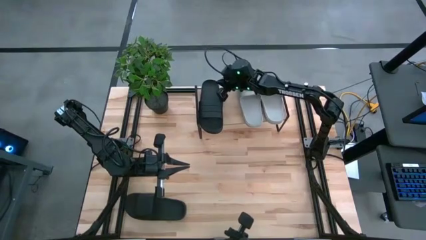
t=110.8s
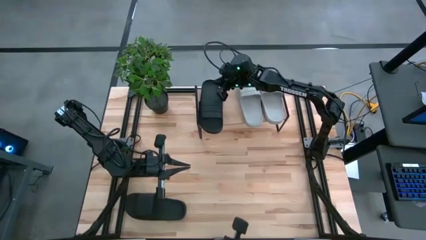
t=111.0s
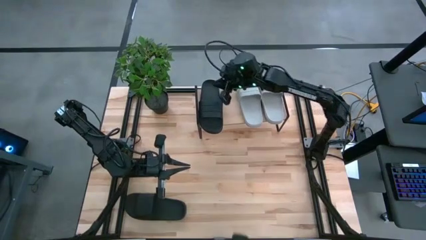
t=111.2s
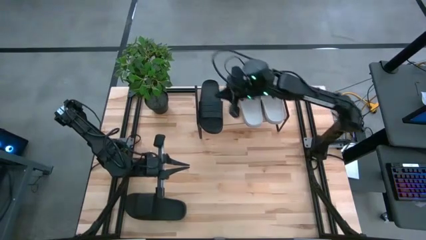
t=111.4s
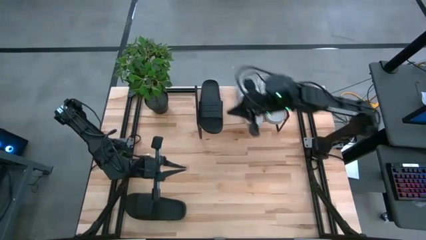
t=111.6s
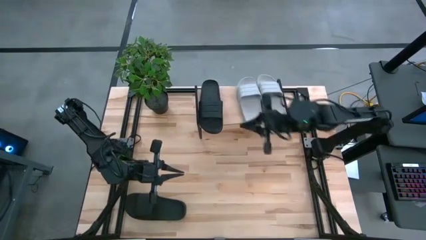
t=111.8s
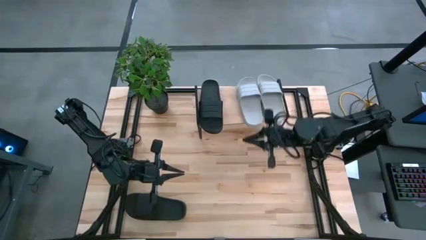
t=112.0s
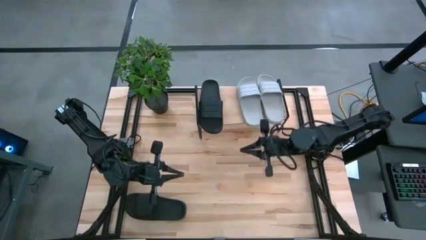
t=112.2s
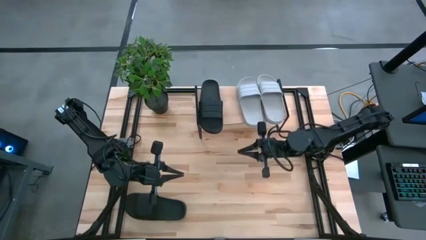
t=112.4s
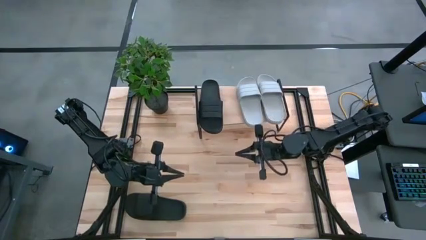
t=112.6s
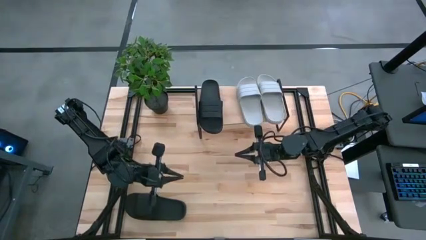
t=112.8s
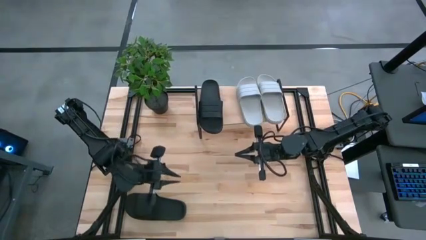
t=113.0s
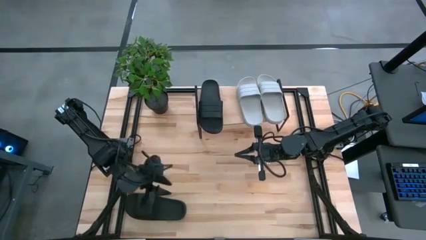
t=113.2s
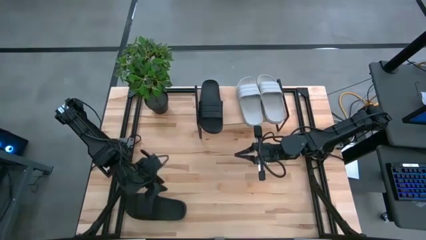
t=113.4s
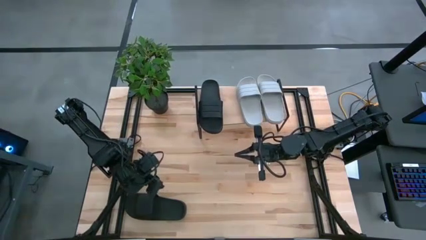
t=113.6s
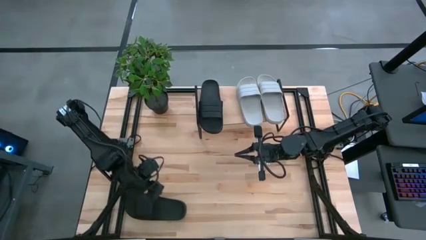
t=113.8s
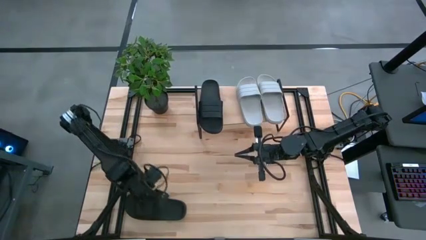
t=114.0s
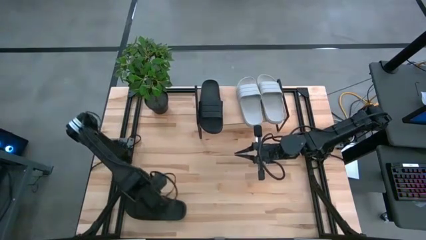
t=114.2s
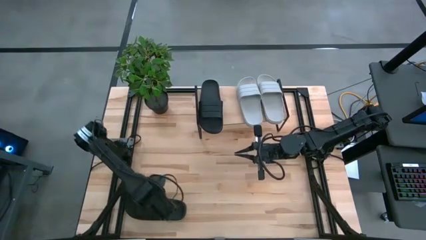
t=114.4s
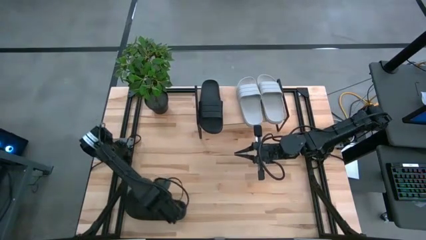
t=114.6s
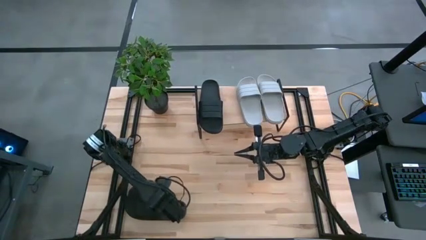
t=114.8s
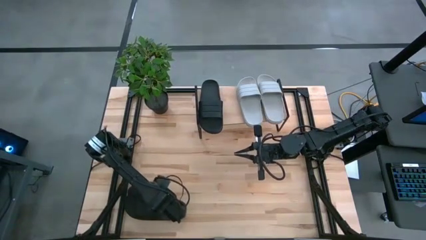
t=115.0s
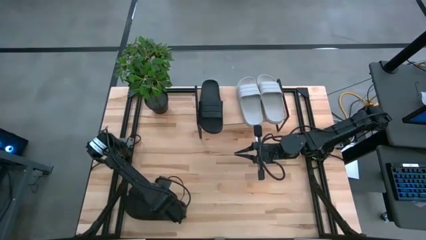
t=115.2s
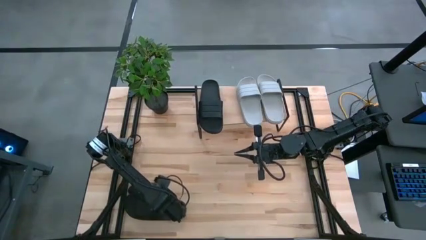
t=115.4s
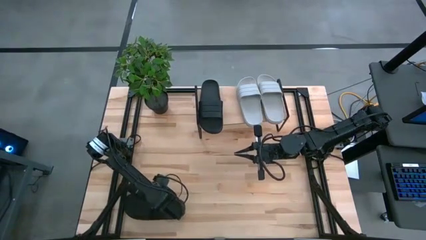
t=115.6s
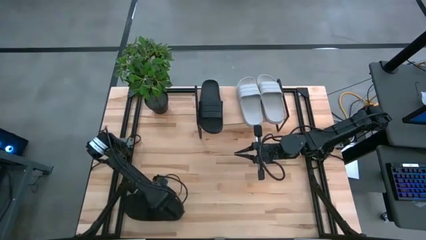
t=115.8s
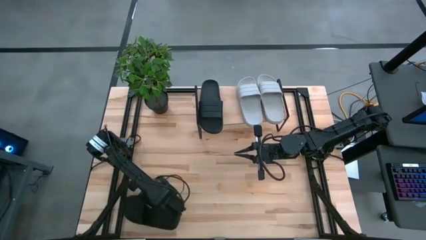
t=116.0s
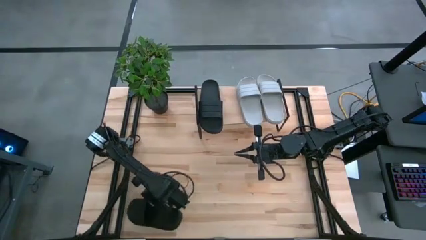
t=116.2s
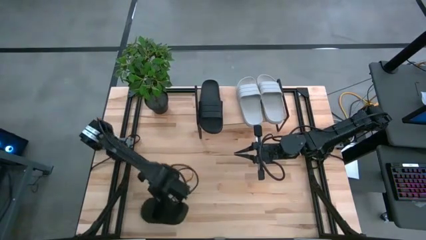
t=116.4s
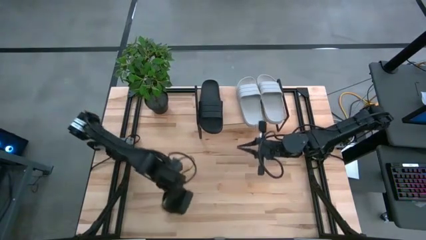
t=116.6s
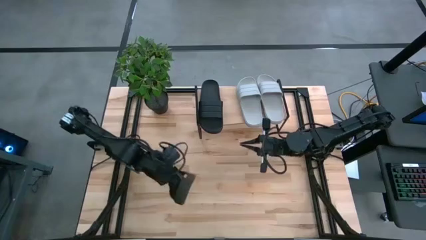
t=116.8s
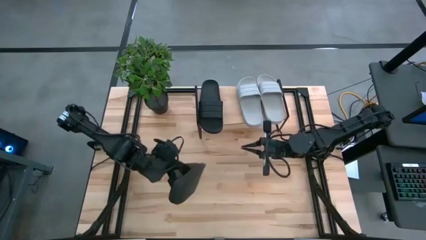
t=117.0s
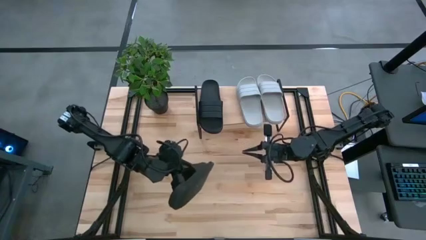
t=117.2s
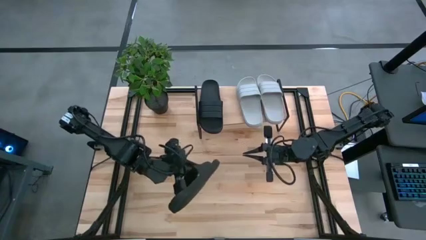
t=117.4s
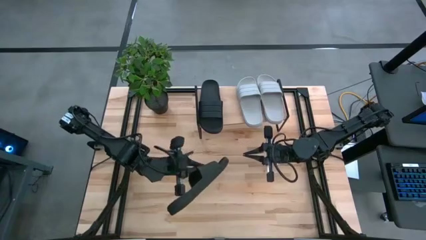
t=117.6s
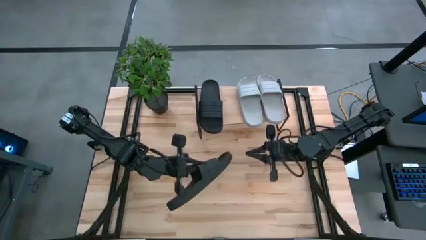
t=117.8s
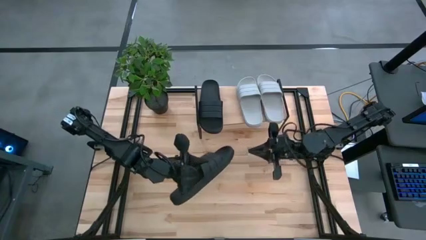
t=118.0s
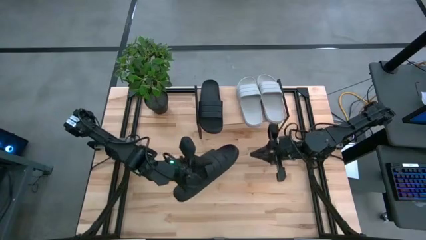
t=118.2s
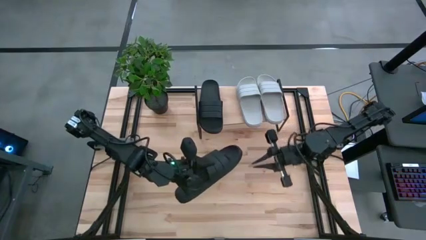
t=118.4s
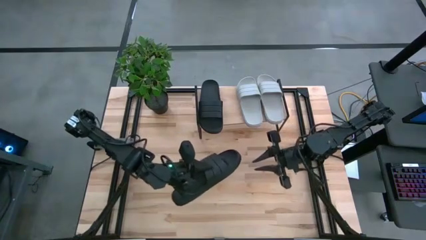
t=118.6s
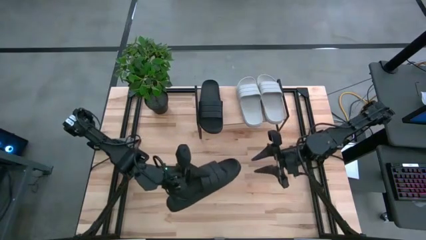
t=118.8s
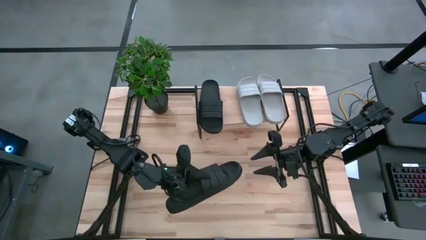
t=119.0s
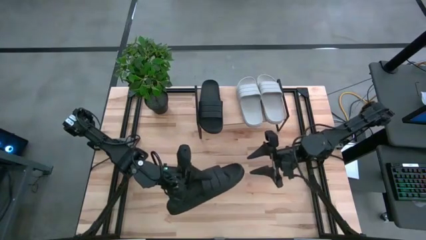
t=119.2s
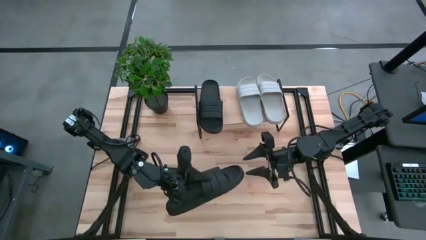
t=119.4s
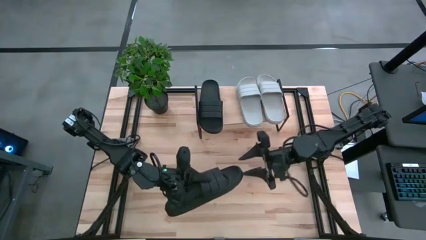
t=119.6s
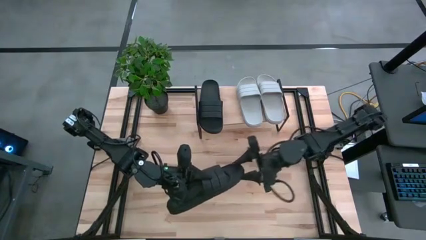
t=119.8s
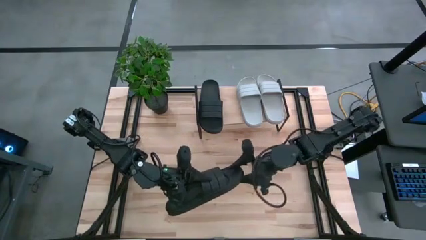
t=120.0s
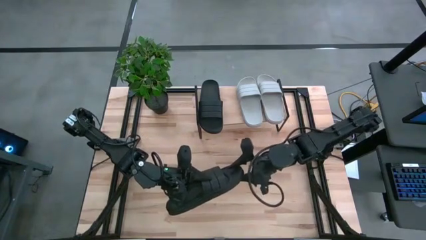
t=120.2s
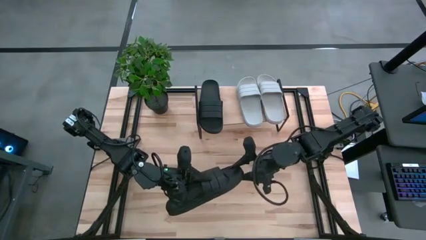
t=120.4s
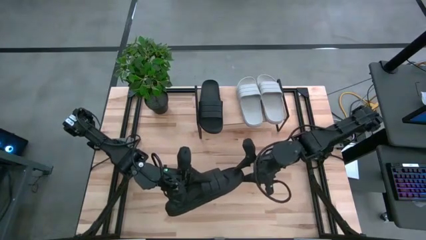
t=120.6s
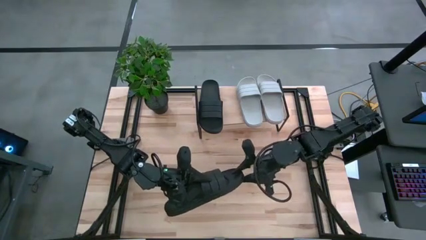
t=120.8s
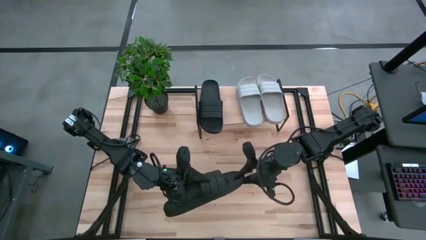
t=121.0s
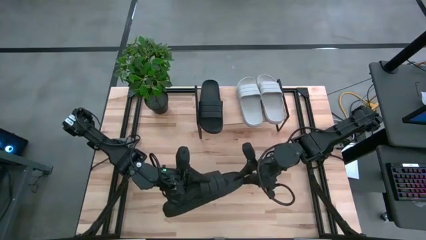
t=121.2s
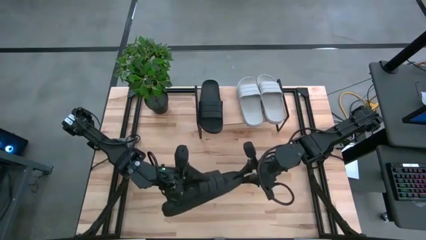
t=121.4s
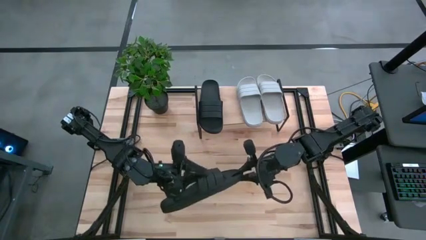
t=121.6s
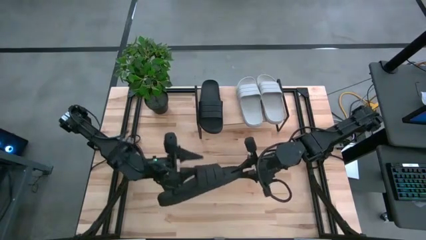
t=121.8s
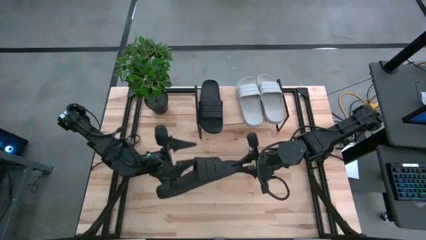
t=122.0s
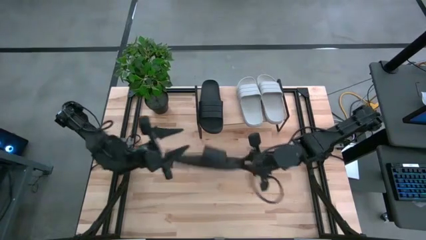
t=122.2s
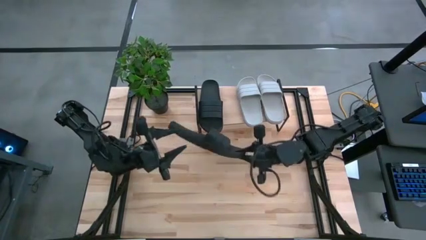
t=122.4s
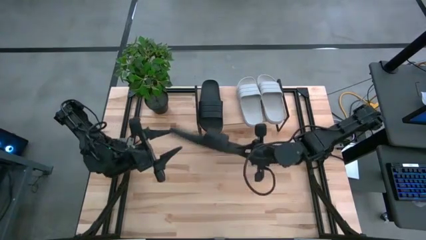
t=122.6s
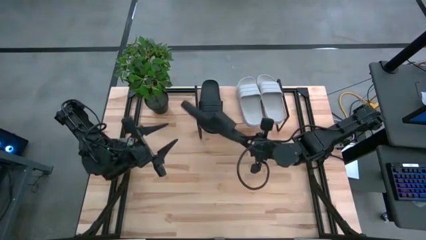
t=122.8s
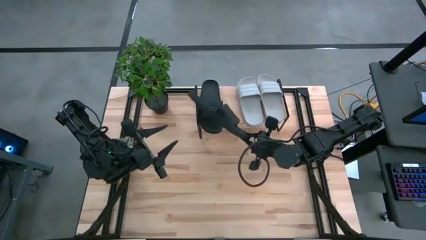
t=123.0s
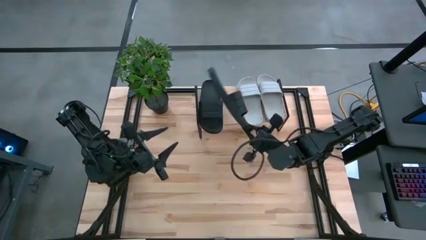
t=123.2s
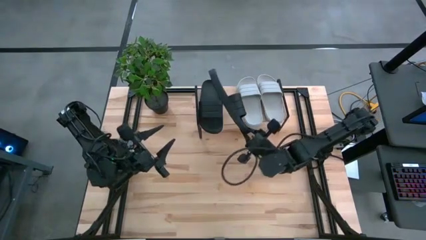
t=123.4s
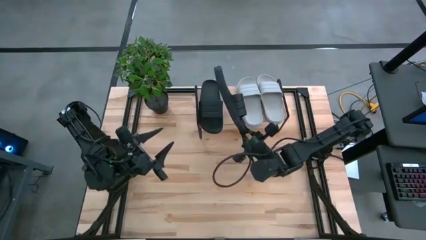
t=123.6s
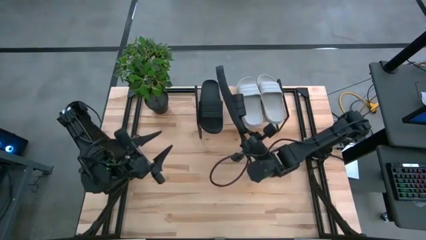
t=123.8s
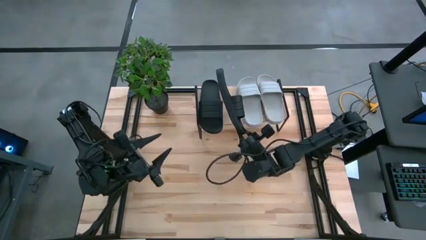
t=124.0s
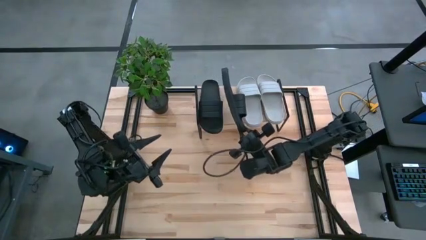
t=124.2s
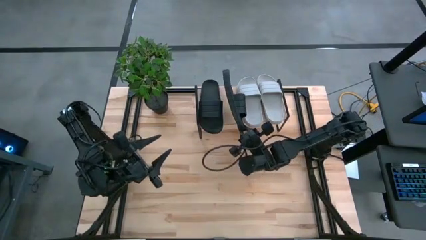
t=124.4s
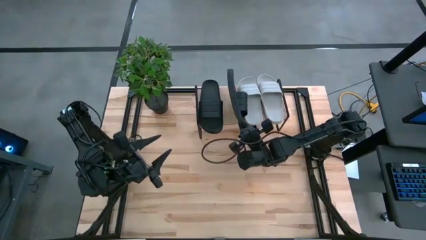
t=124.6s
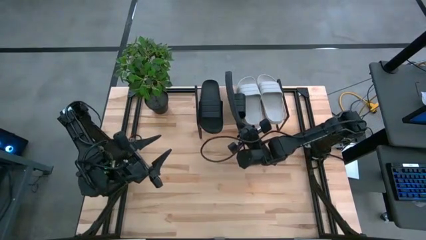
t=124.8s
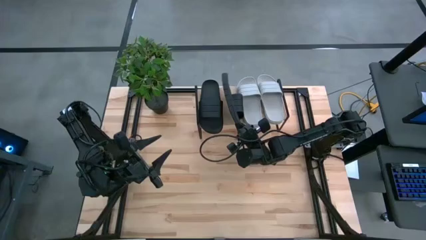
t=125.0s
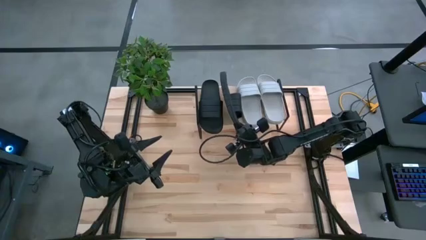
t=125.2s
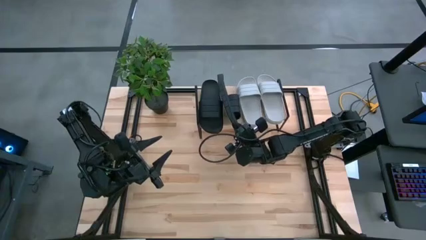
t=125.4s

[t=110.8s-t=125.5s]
Task: Pick and place slides into the shelf
Put the black slide on the shelf

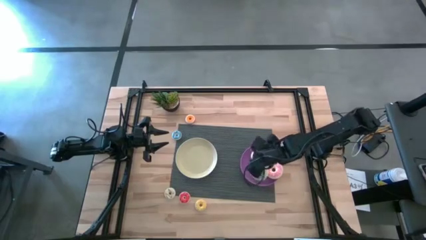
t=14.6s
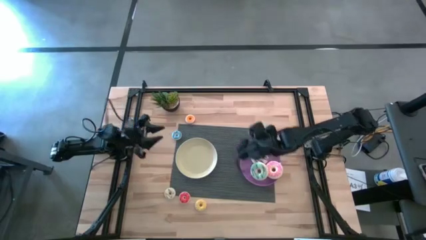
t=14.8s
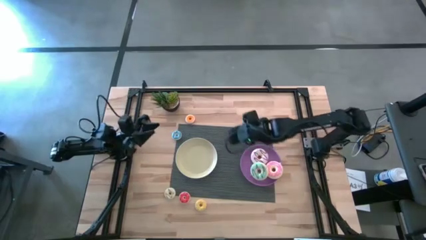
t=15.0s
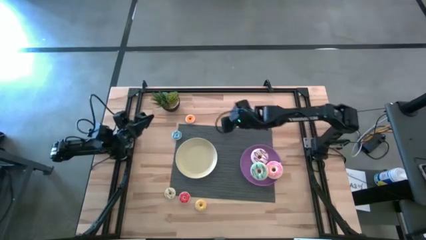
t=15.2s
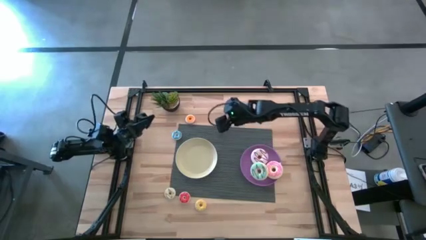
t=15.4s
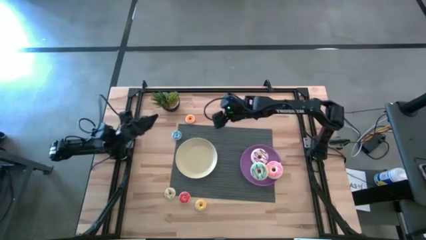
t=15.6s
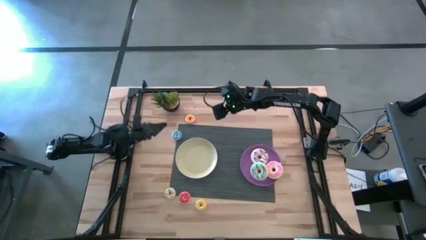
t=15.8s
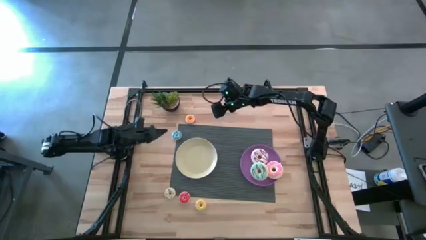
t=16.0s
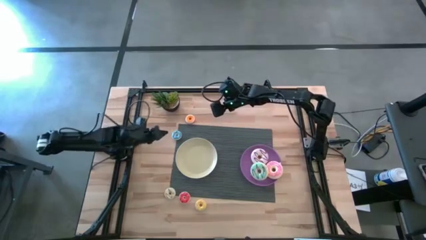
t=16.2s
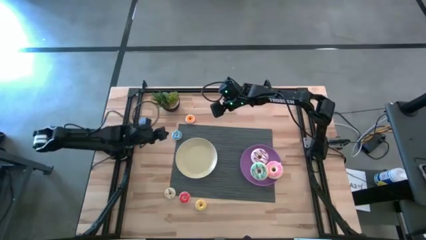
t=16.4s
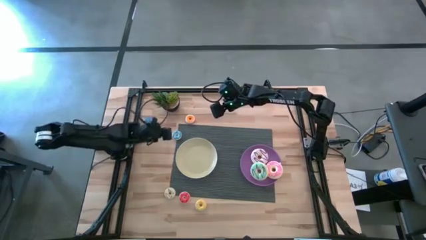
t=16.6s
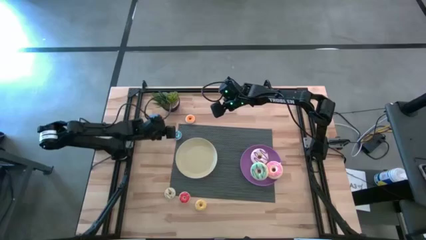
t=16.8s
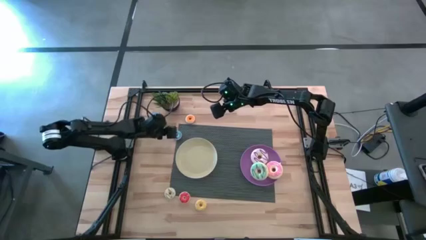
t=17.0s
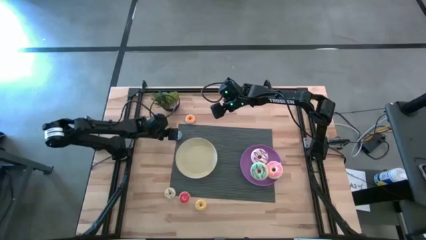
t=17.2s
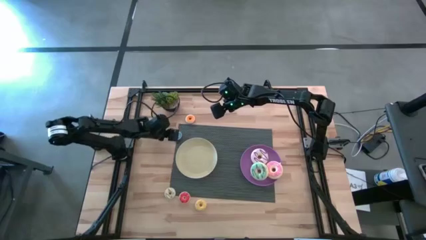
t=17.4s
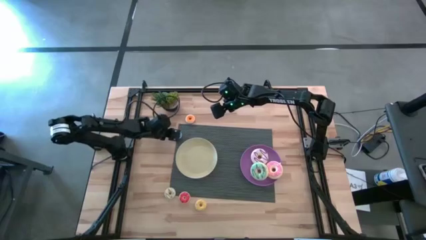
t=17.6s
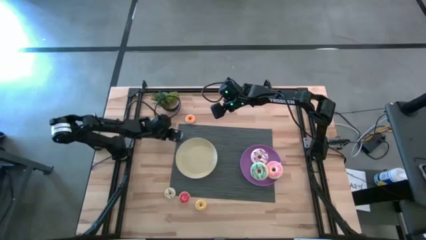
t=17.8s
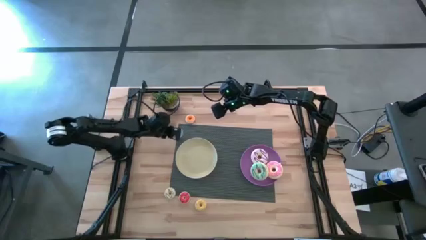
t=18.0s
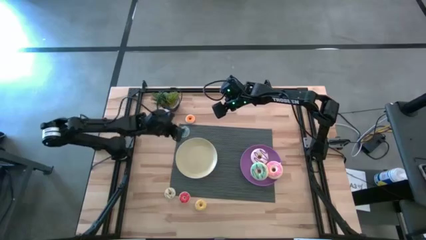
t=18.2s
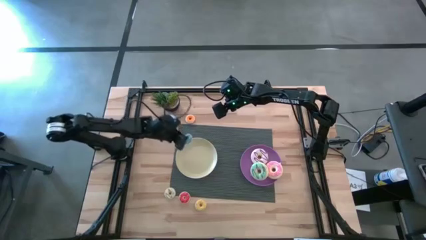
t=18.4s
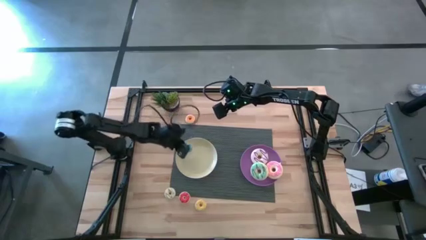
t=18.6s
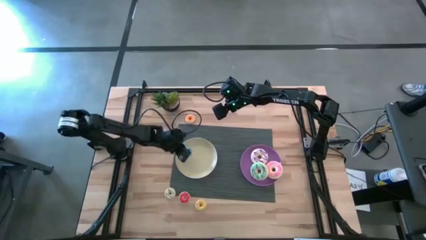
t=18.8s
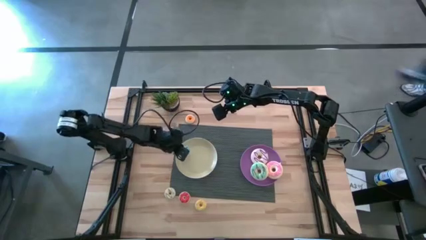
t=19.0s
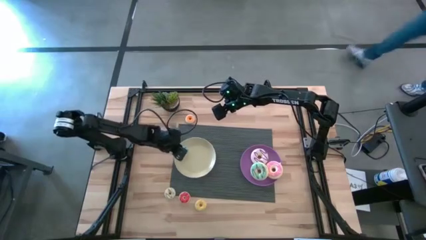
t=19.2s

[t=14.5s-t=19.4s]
Task: Pick & Place donuts
Put the small blue donut on the white plate
